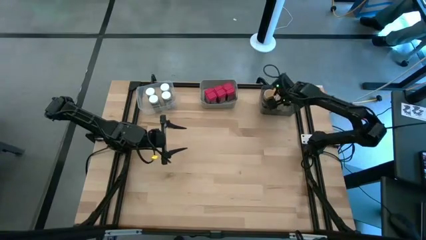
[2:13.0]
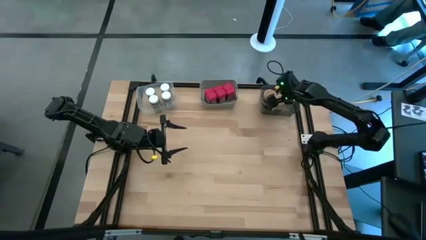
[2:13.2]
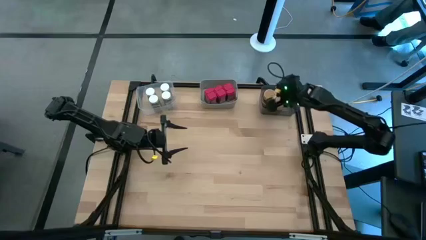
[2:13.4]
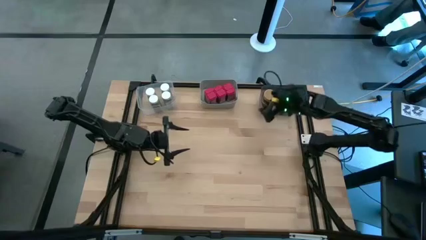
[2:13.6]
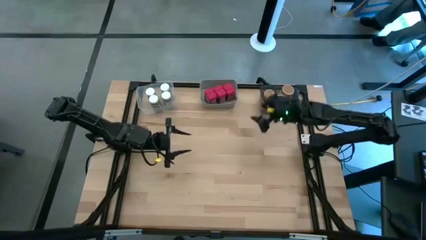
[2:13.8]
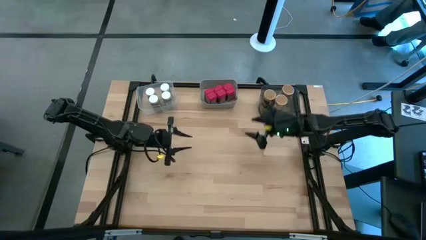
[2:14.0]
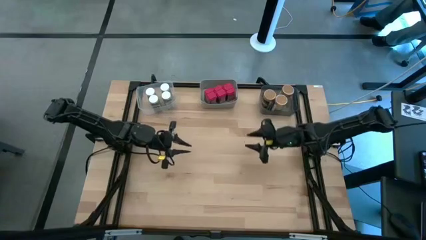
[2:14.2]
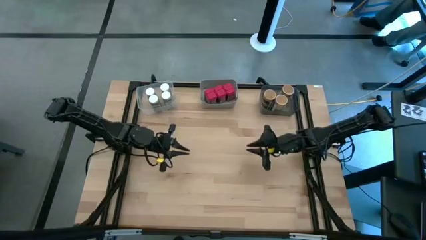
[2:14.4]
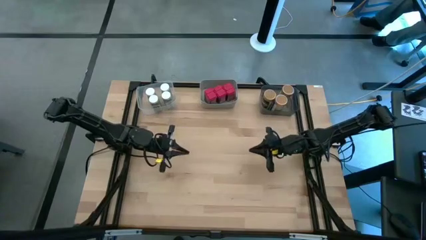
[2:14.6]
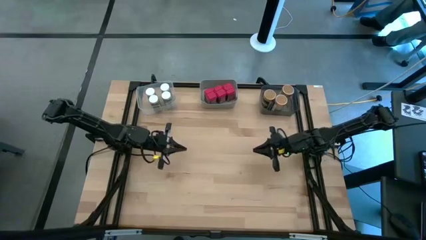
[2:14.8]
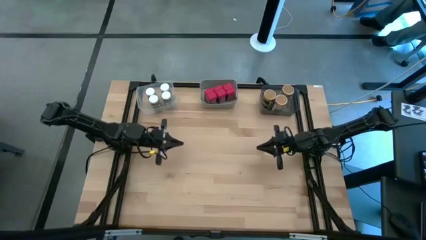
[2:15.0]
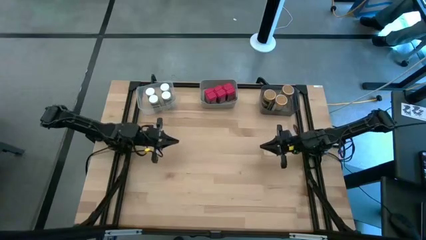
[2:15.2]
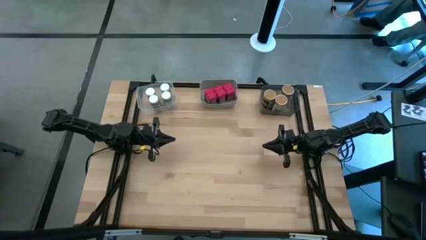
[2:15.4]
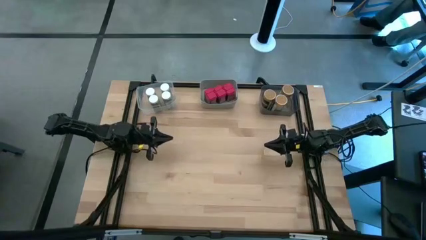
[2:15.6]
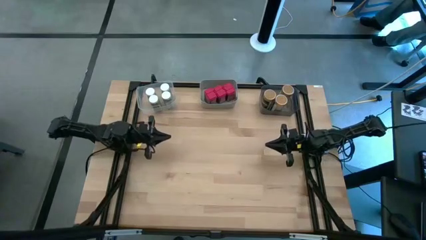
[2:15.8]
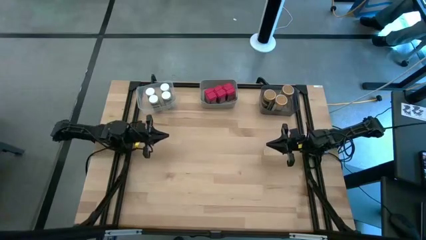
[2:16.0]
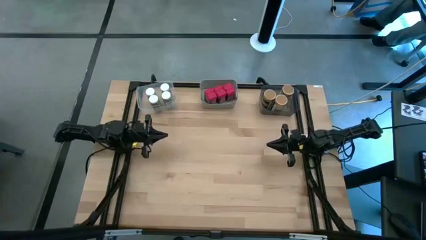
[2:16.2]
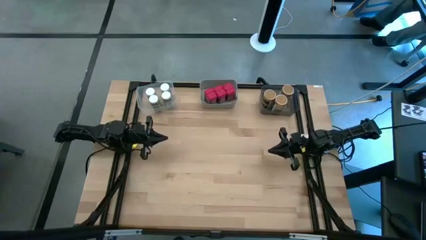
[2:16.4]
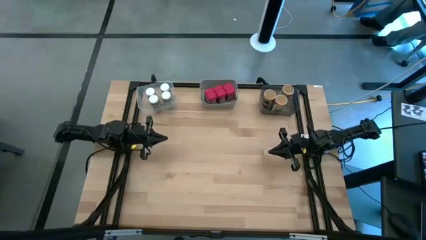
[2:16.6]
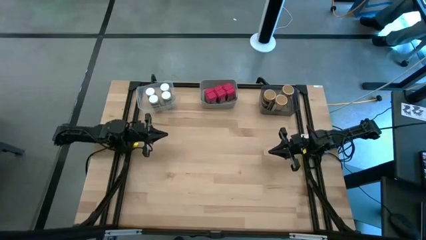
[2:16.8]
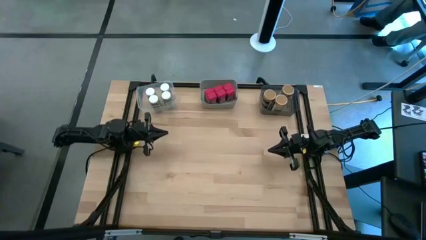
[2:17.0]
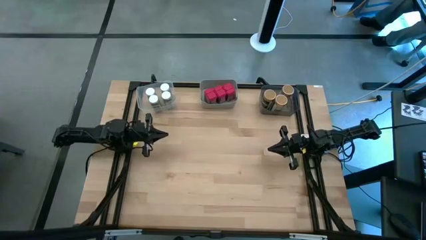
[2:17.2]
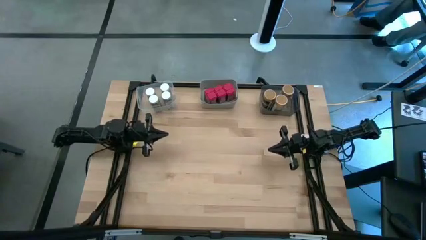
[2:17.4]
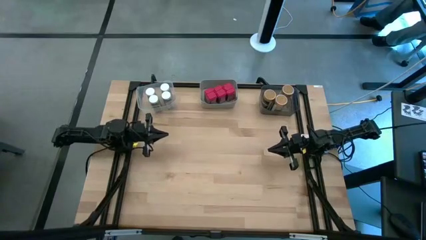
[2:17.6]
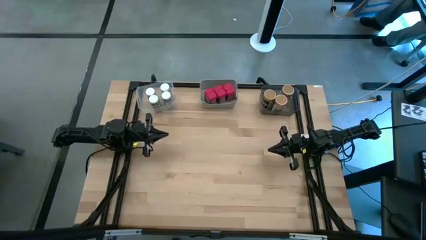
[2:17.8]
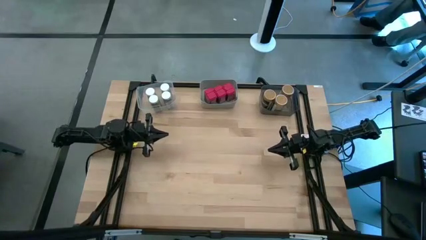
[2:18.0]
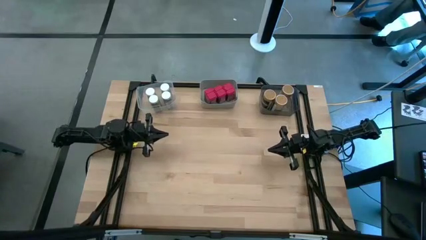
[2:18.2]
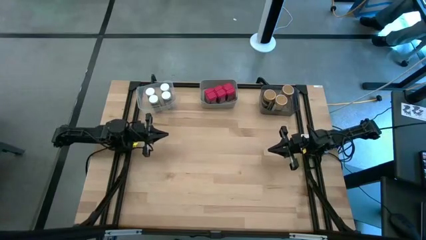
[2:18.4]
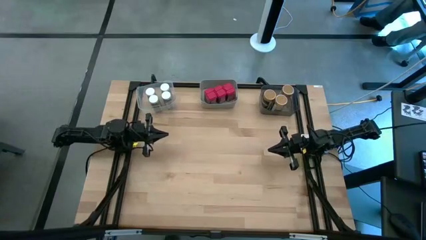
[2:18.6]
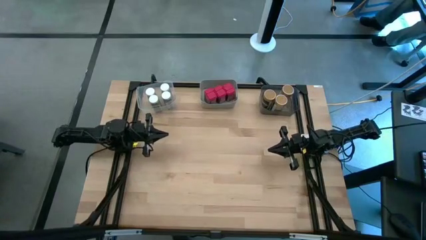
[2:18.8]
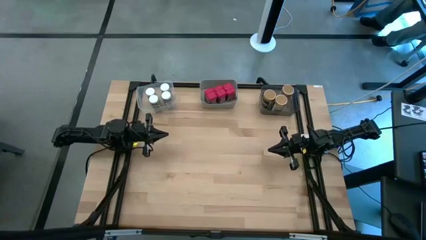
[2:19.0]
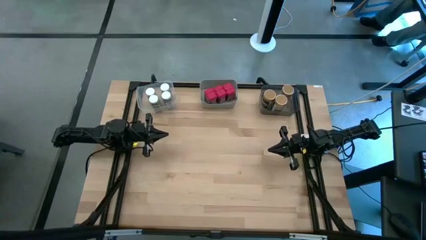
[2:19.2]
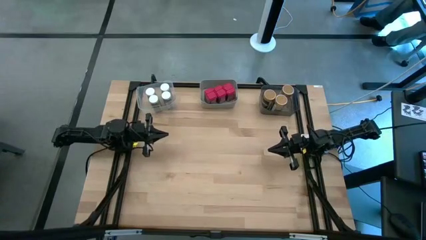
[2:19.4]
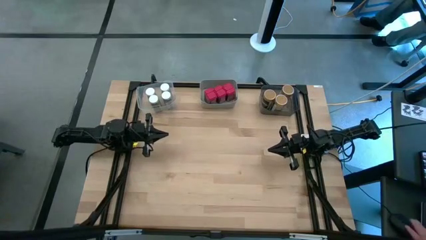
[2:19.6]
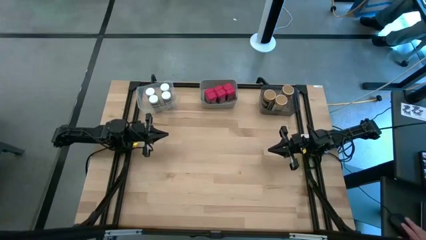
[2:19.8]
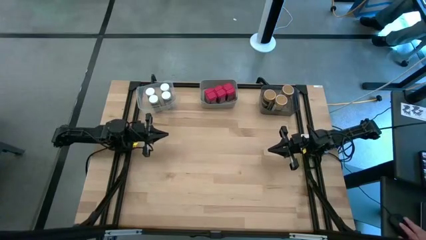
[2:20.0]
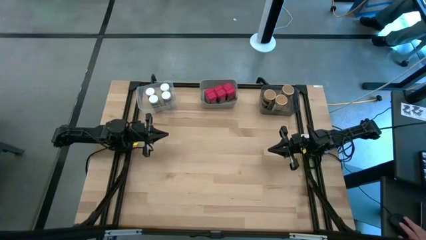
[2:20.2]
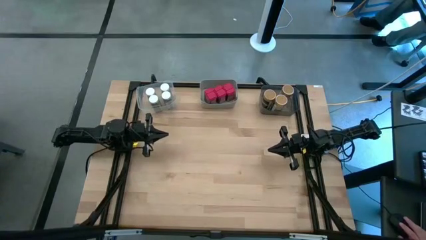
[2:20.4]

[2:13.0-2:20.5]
Task: Sort spices by type
Return to Home Position

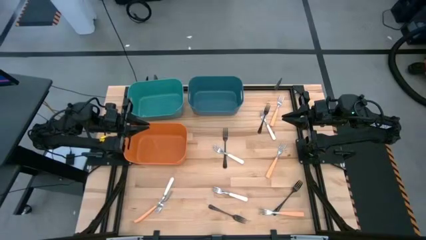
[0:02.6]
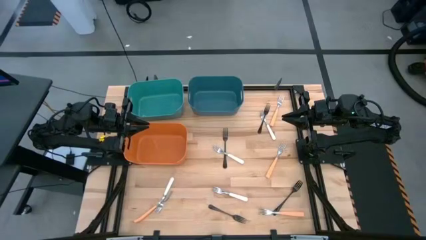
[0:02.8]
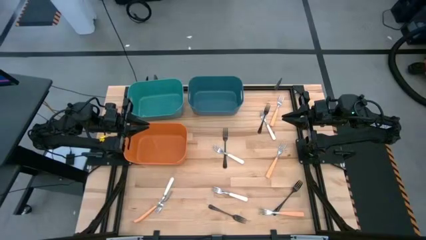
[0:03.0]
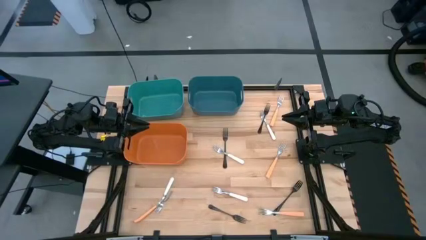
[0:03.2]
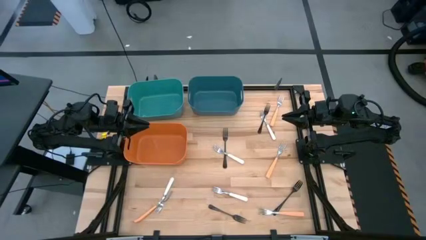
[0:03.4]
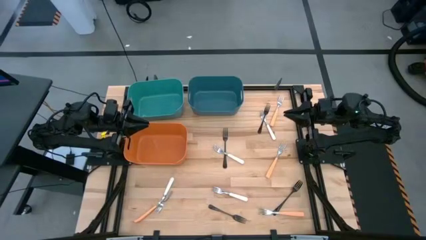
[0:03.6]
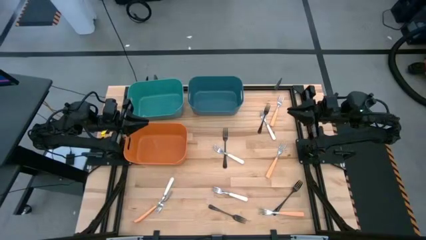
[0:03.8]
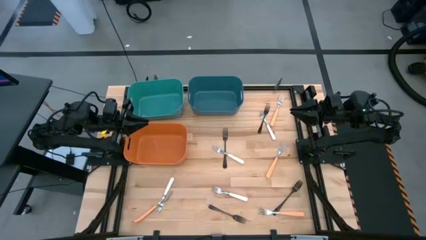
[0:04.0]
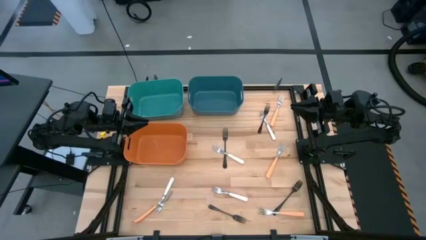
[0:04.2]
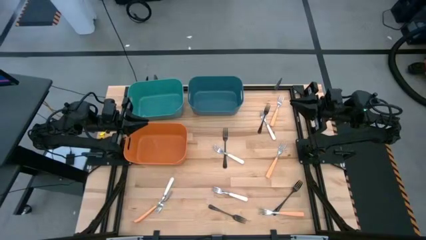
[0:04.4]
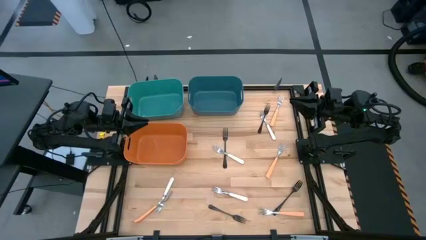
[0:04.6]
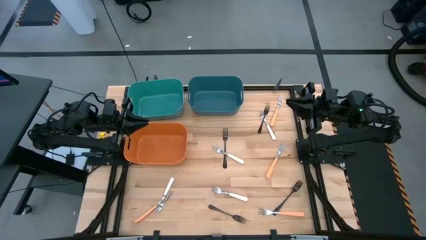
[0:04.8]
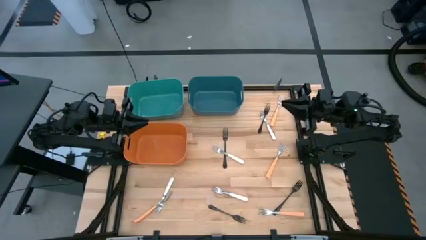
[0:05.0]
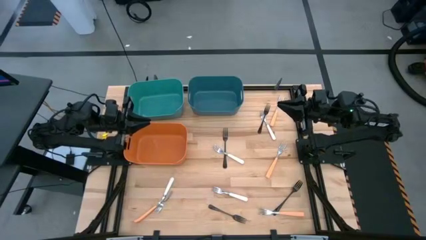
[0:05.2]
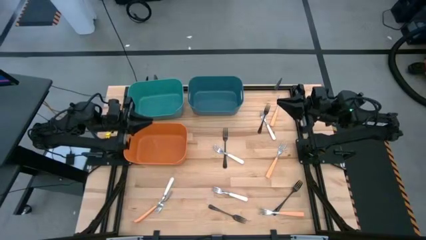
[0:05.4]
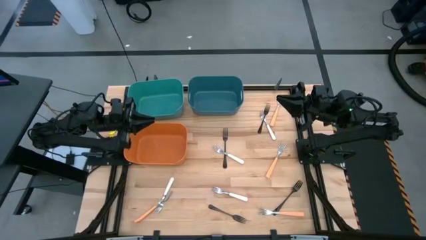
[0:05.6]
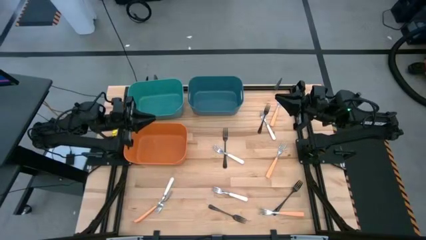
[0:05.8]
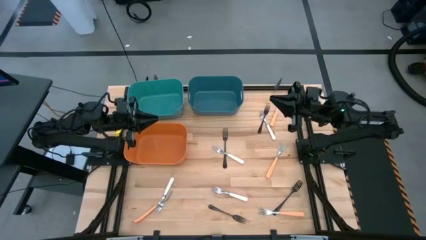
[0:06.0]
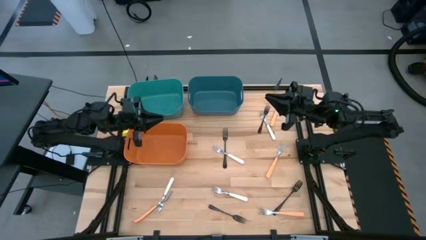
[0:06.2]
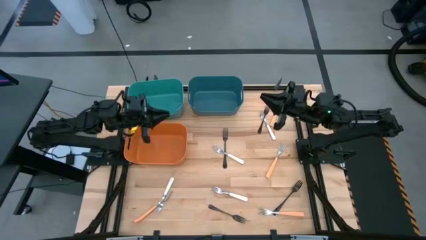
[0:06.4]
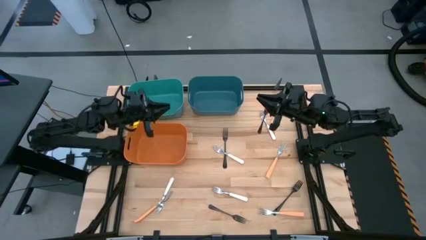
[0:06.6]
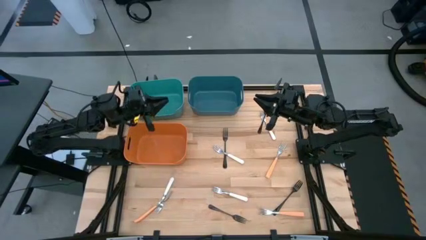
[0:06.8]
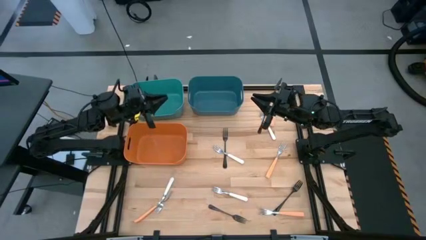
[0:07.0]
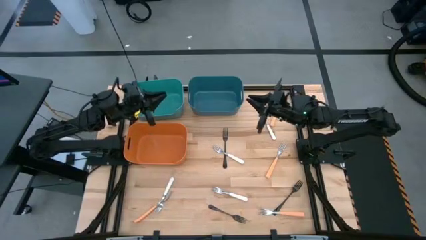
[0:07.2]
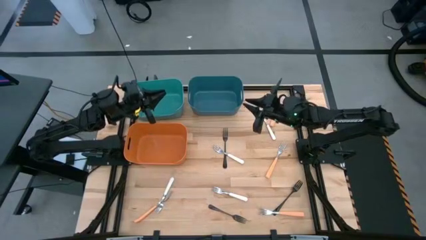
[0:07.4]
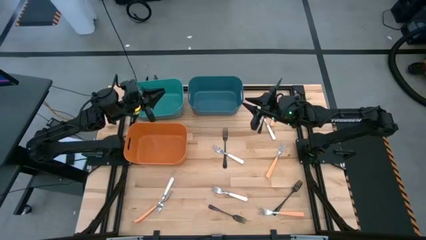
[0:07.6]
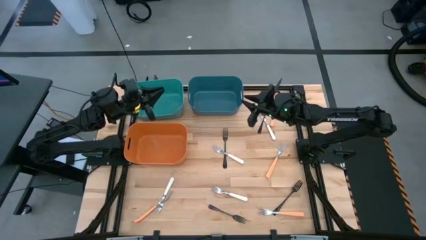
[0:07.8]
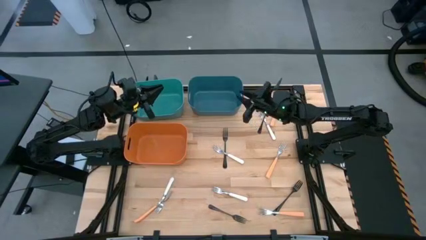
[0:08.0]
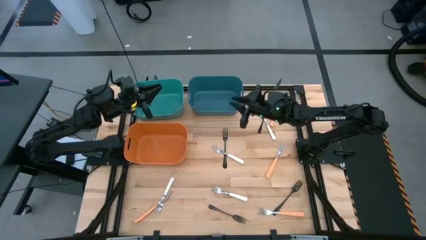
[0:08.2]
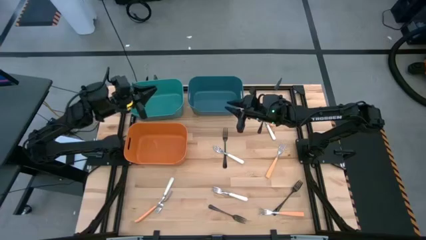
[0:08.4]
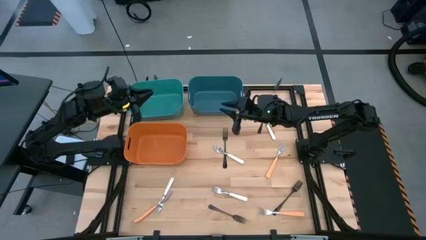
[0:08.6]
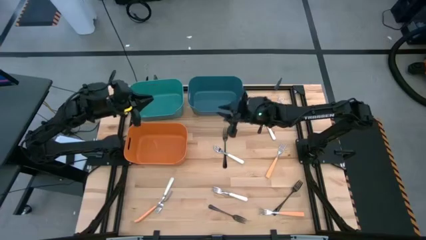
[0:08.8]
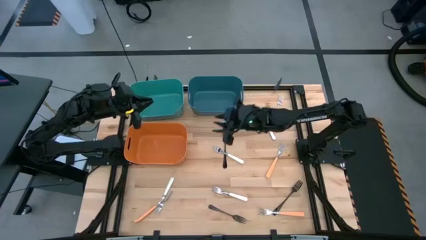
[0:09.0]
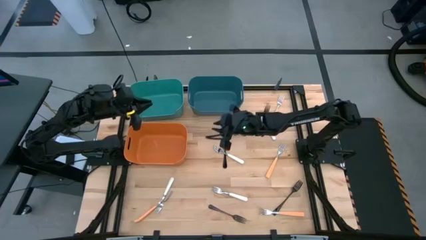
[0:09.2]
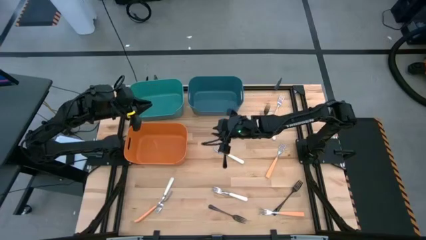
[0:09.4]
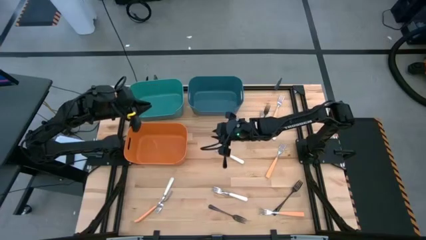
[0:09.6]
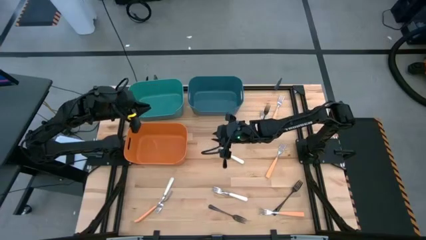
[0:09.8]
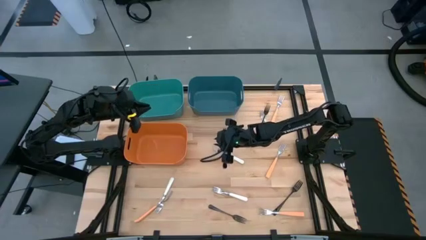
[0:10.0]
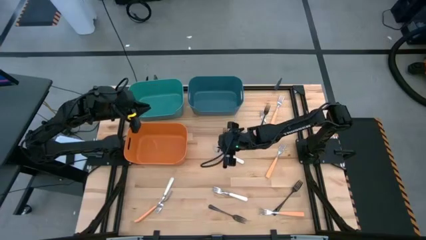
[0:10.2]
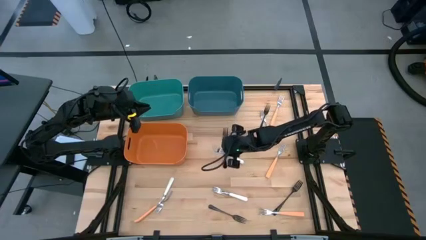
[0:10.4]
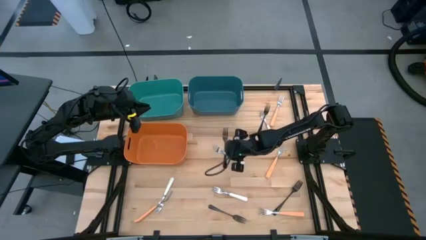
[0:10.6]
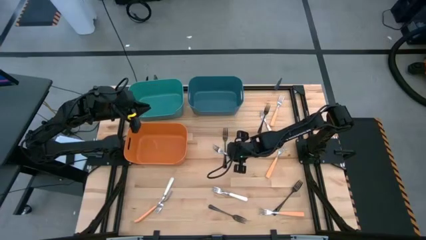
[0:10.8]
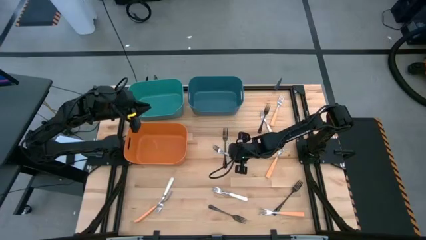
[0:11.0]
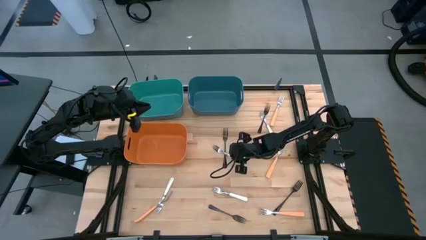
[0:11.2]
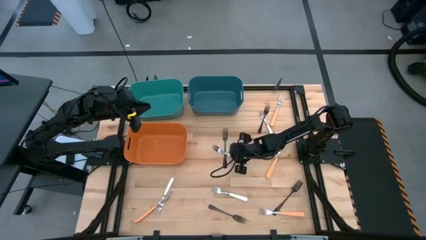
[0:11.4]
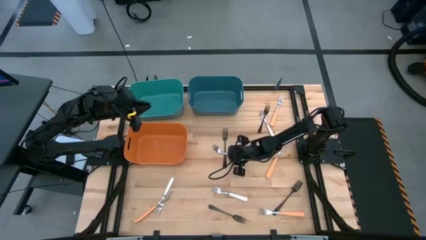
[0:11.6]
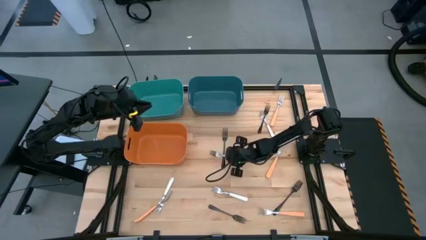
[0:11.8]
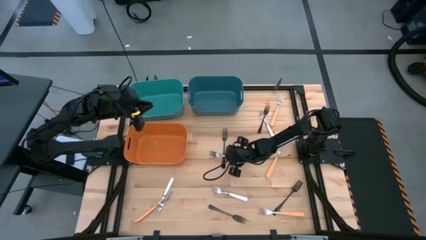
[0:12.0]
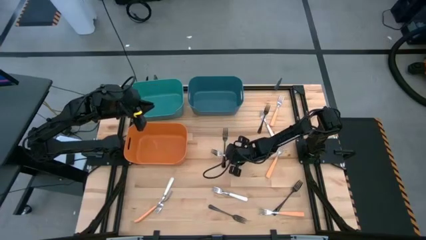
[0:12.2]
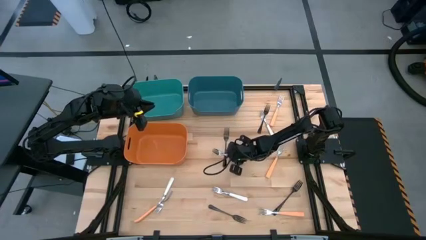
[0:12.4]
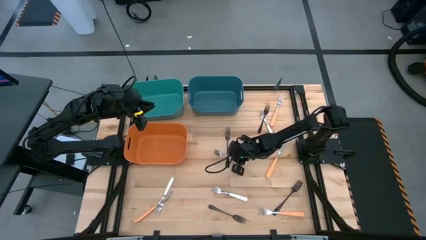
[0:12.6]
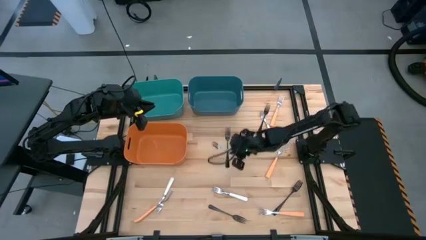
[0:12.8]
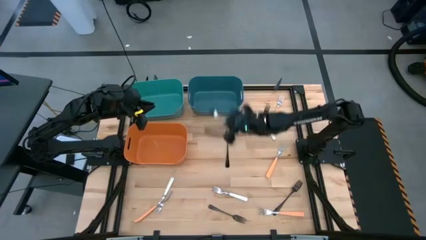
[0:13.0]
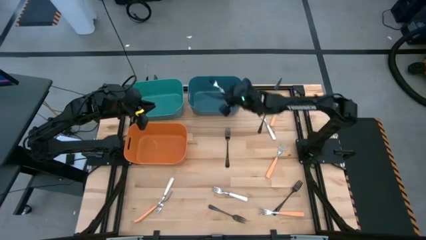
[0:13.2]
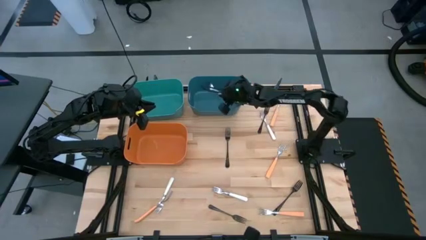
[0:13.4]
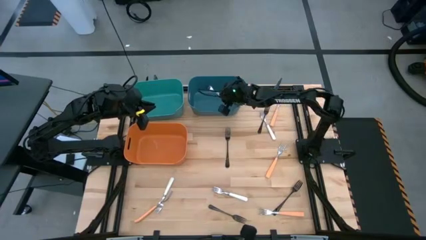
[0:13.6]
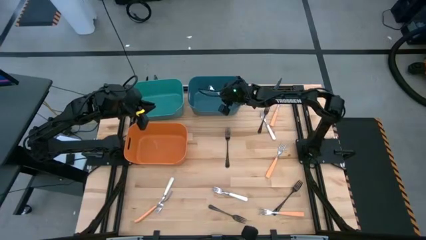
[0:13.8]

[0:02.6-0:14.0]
Task: Sort silverware by color (type)
Put the white fork into the blue bin
